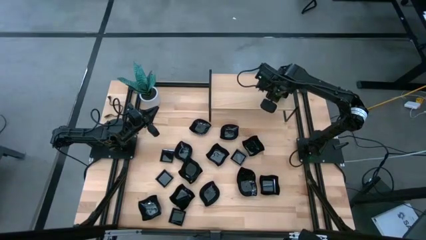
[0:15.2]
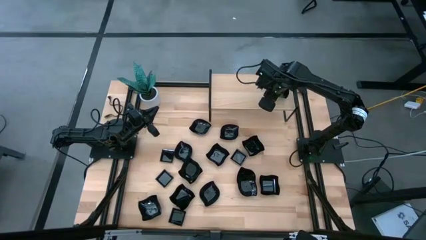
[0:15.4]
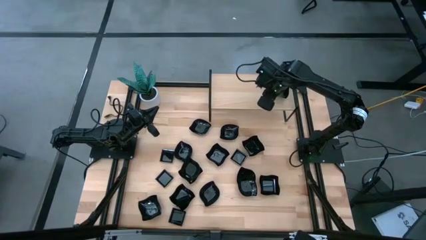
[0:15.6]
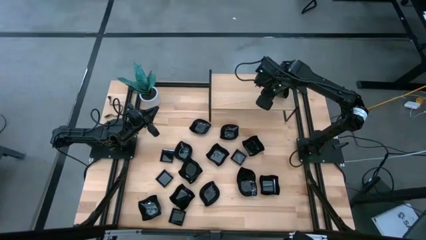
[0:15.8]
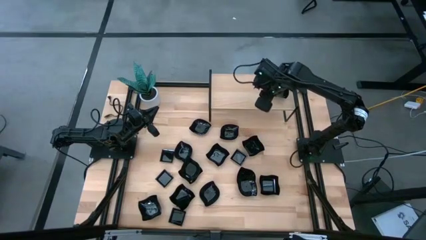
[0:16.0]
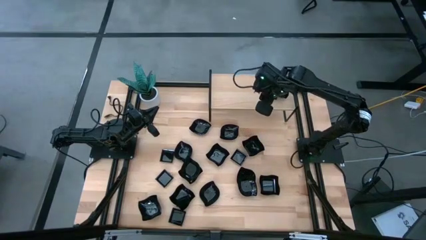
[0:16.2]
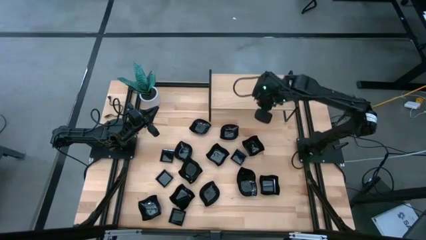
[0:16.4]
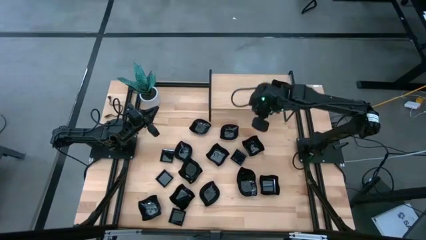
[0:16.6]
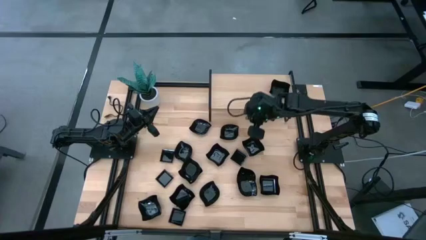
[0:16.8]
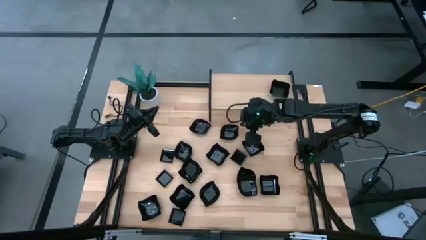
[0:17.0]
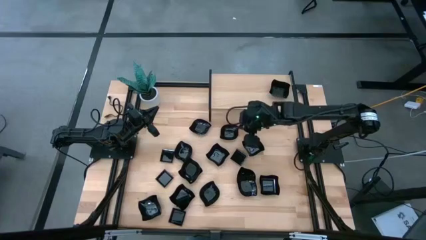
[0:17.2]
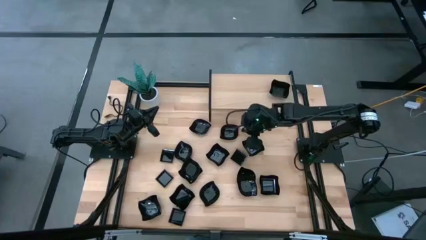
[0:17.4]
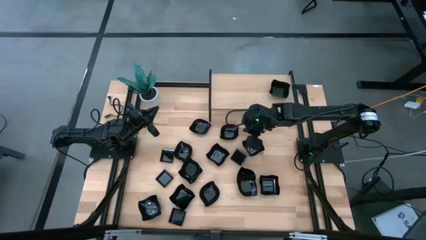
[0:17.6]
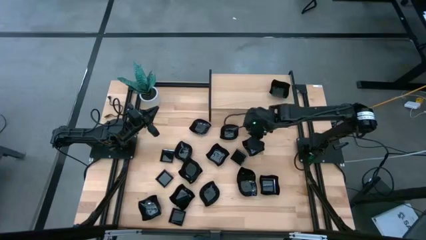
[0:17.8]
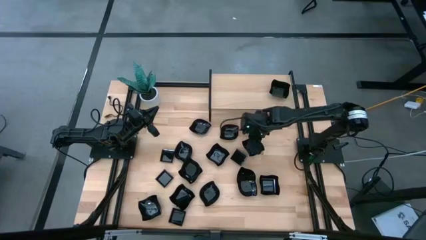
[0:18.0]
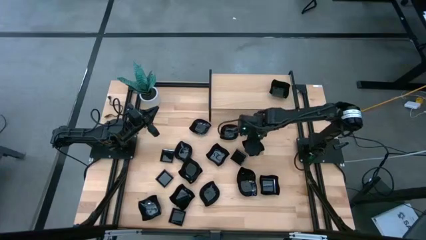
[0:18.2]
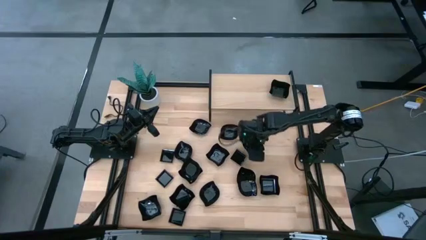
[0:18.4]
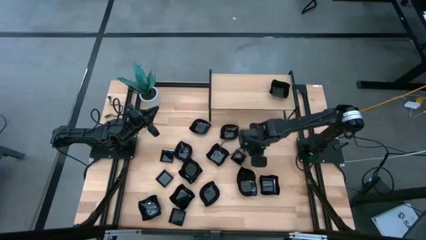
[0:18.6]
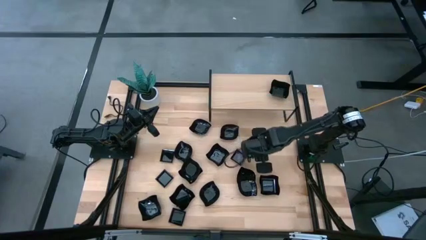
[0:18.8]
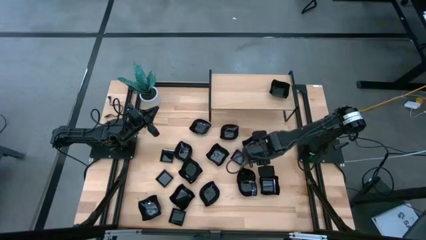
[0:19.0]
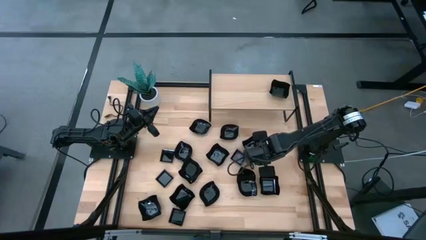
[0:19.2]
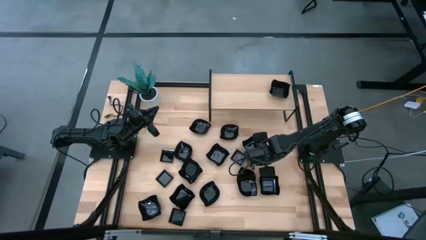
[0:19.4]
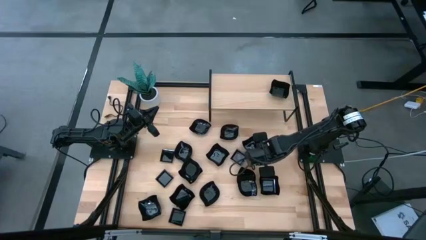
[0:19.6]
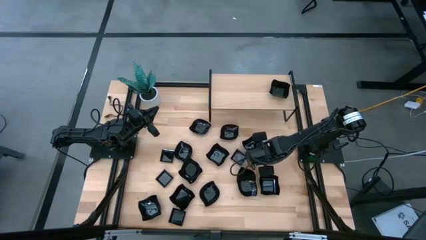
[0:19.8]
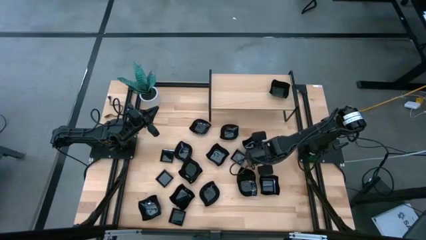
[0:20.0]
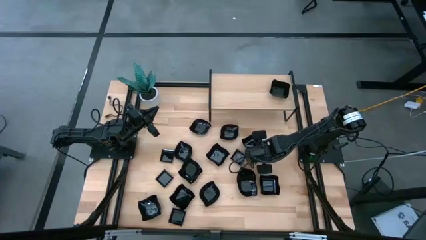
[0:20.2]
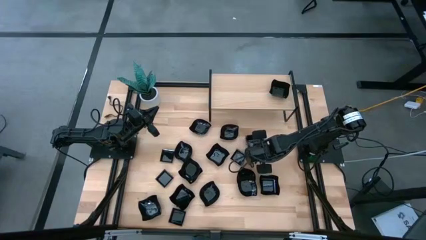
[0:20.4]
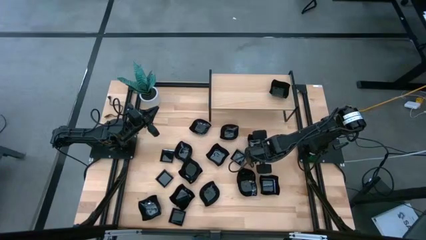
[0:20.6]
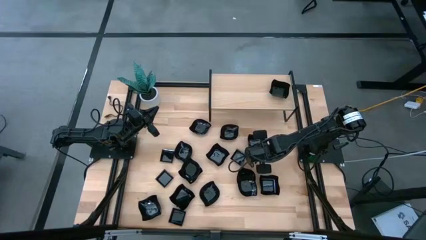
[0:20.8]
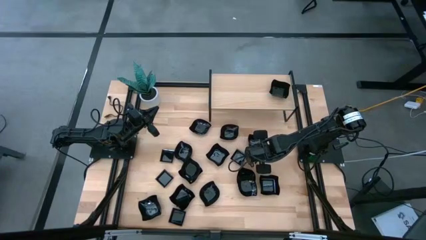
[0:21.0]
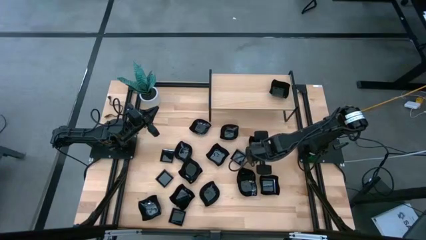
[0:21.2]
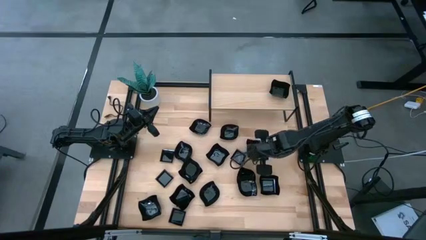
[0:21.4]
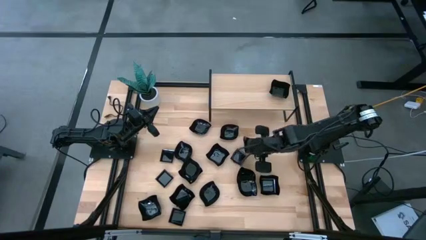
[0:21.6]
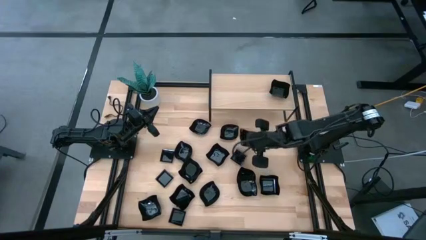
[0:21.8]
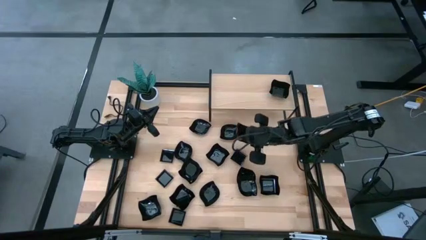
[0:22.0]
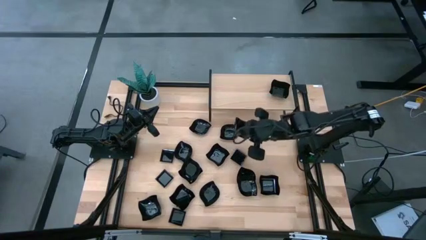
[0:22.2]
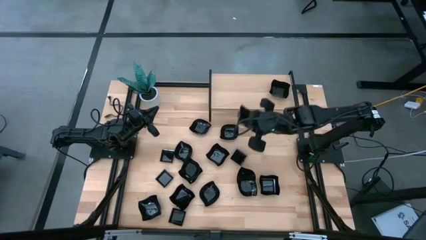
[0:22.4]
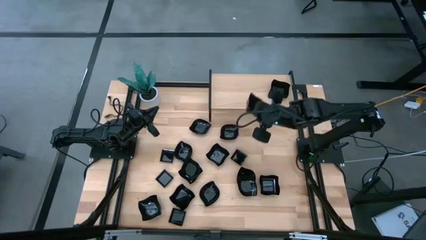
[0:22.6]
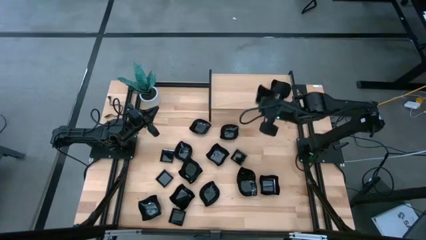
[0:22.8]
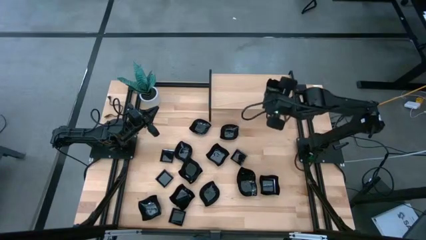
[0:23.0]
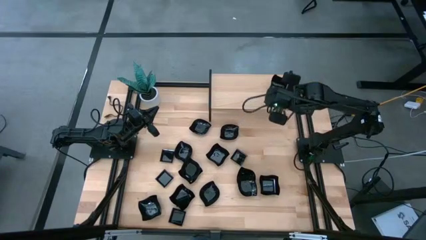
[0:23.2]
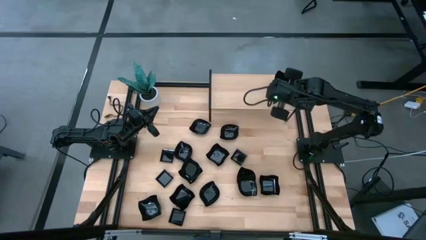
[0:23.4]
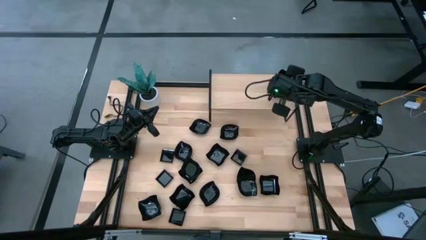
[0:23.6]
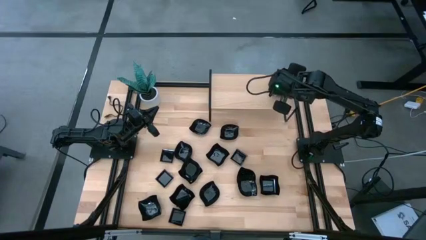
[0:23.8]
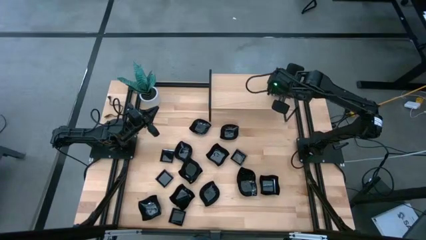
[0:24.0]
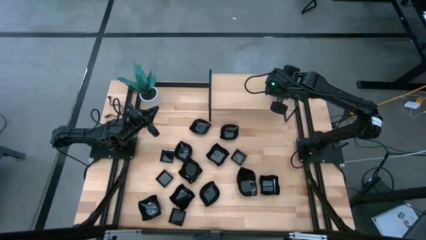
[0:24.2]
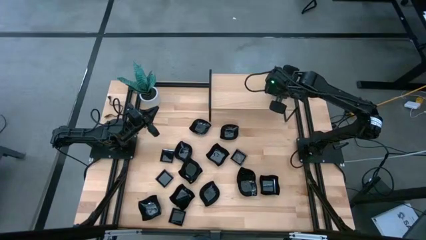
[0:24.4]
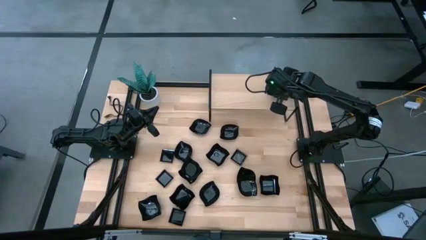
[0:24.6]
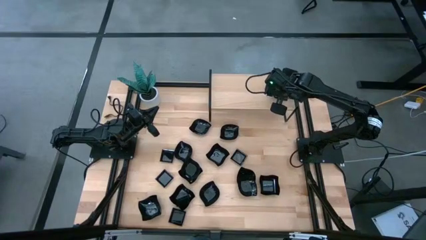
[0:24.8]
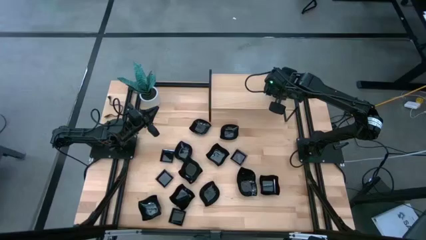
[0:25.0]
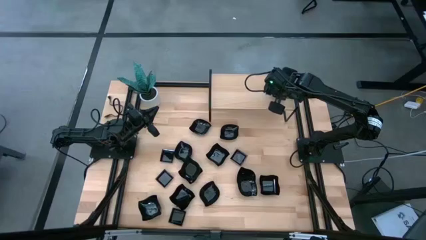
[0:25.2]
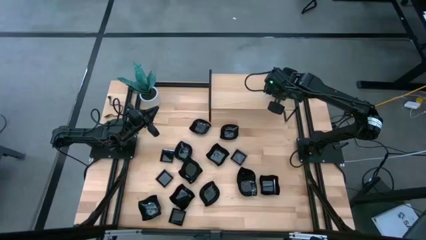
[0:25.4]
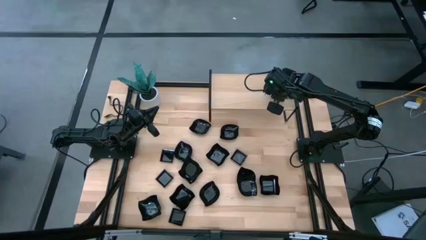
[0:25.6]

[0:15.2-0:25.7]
Task: Pick & Place Mini shaped plates
Stack the black distorted square plate on top of the black distorted square plate on the shelf

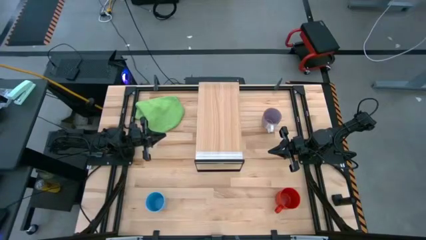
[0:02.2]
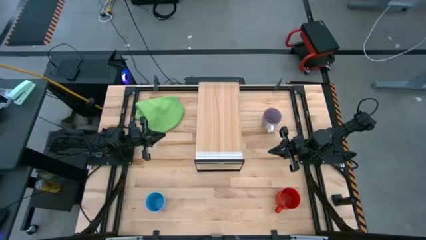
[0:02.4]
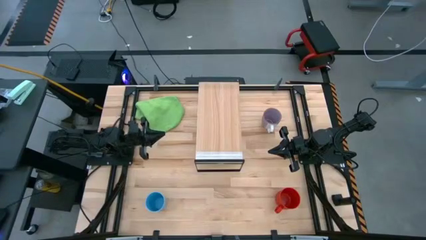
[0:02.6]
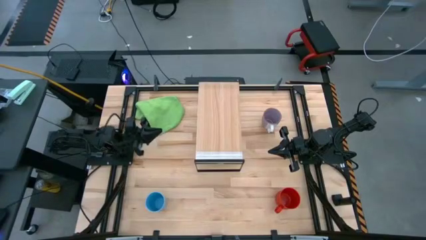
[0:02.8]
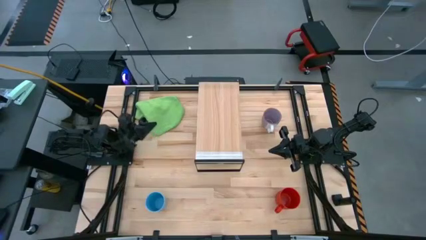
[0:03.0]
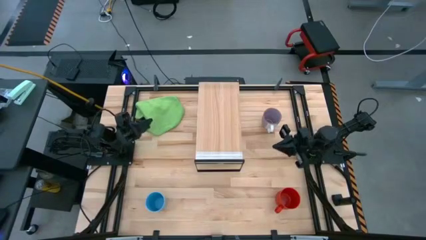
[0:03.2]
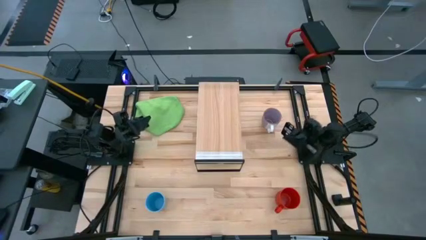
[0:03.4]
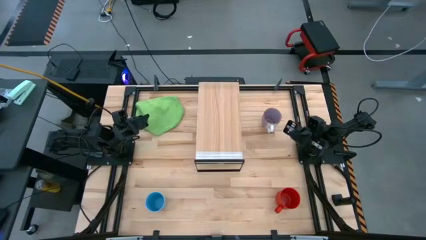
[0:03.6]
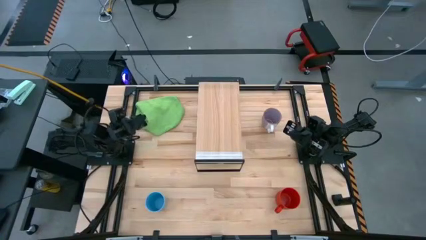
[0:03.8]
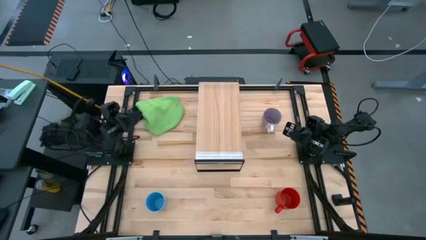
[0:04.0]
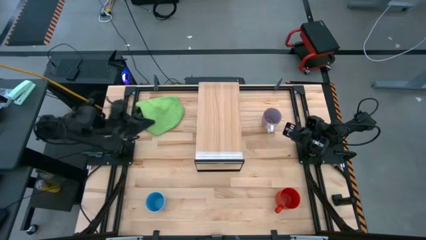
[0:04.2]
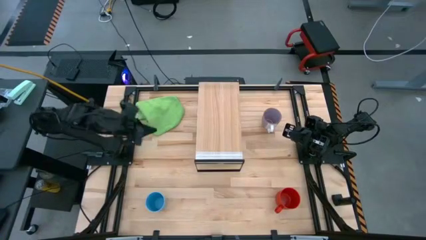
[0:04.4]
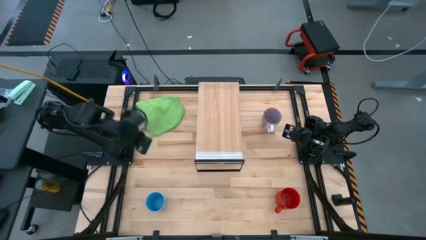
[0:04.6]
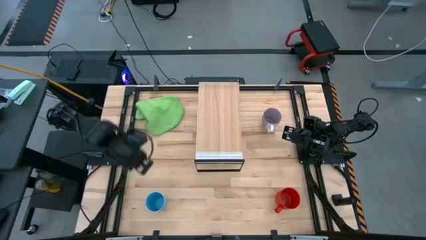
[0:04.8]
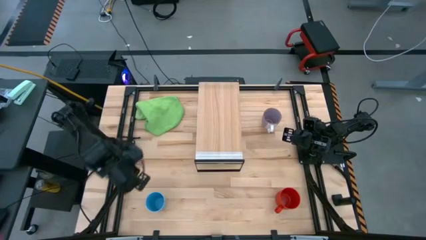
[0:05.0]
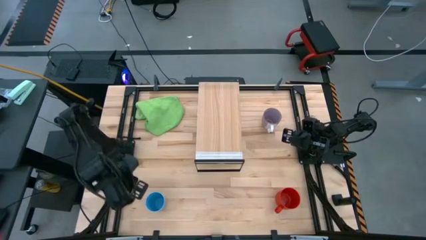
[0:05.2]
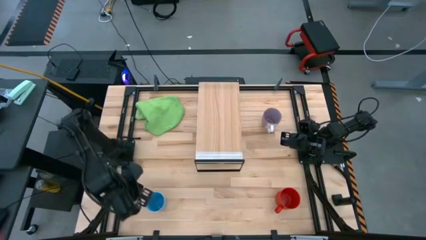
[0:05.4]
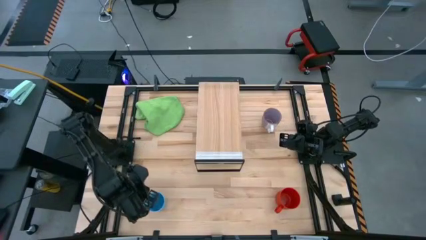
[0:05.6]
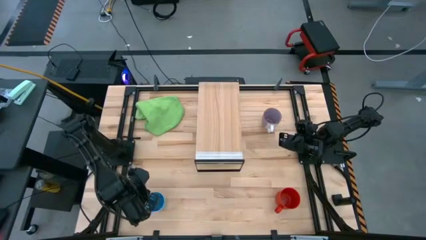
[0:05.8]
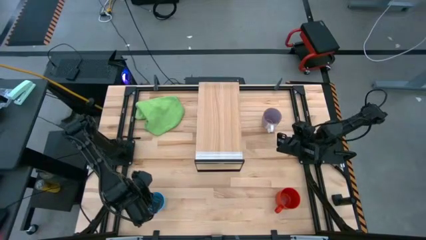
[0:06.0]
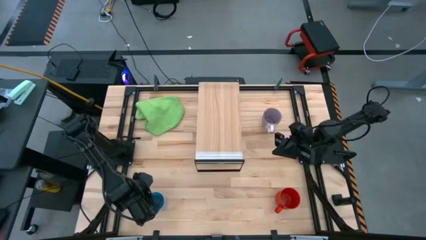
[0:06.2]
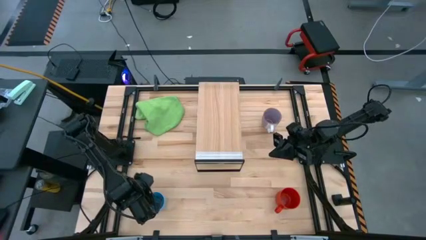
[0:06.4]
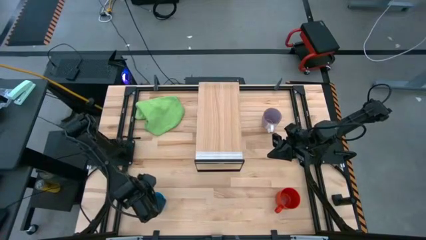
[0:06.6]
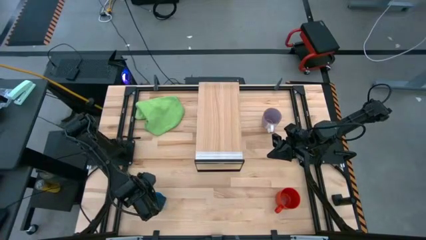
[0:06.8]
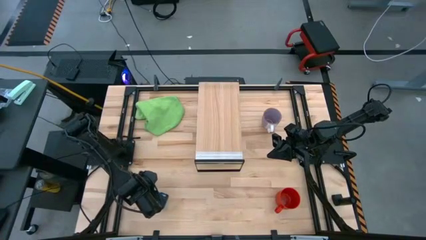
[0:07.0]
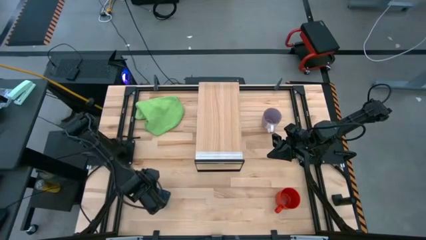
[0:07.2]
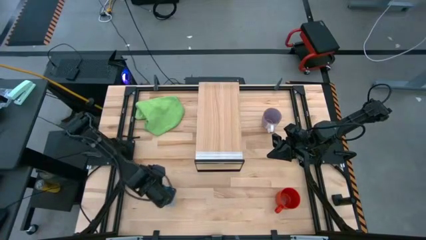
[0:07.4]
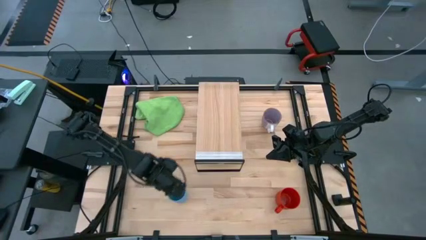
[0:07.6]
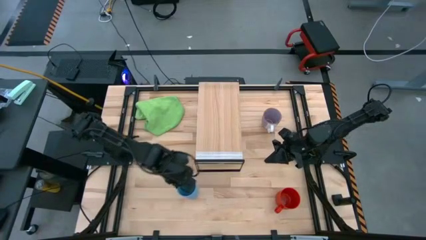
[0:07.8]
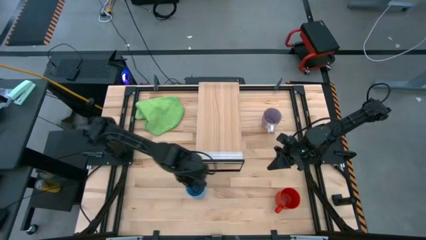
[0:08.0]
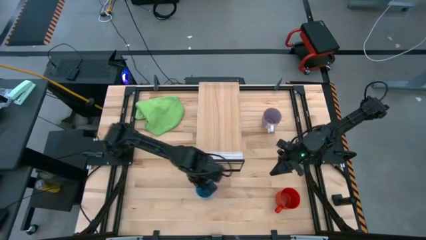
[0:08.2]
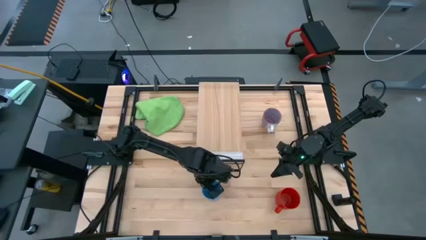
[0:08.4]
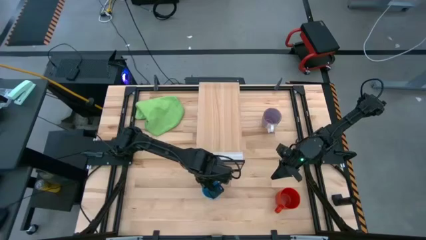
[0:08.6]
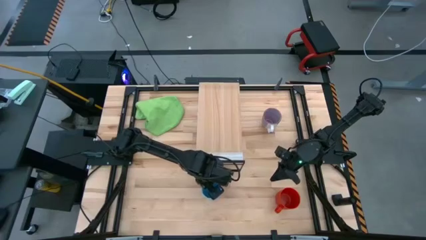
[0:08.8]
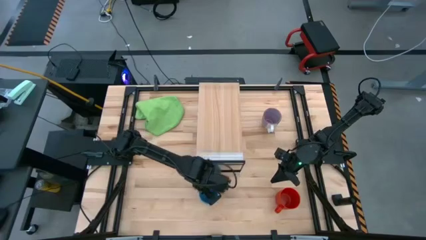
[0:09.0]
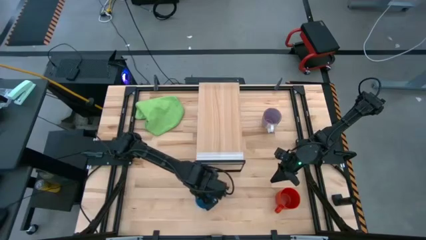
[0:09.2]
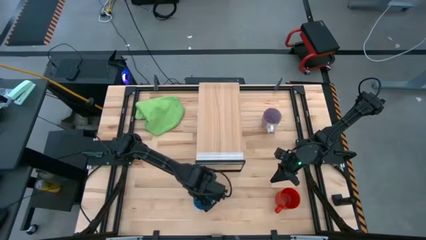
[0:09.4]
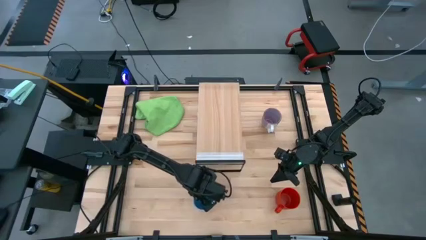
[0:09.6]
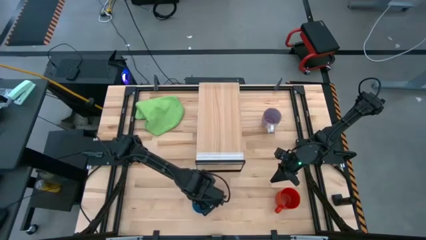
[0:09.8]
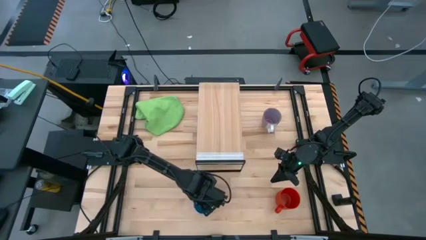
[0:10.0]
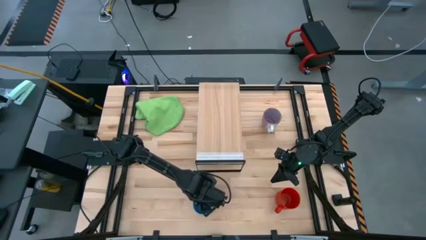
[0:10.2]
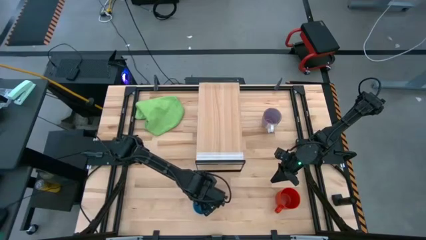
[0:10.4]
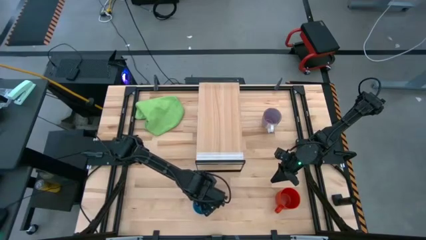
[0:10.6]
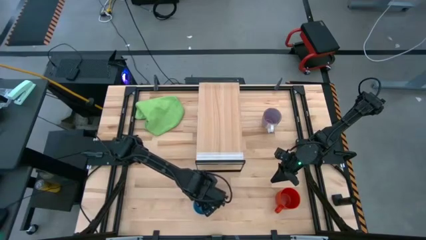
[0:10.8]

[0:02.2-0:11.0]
Task: Stack small to large cups/mugs on shelf
Move the blue cup to the center of the table
